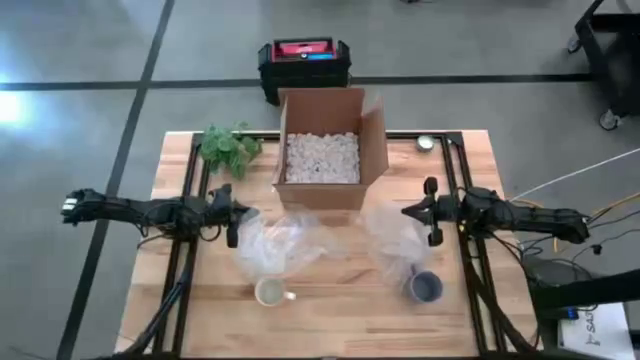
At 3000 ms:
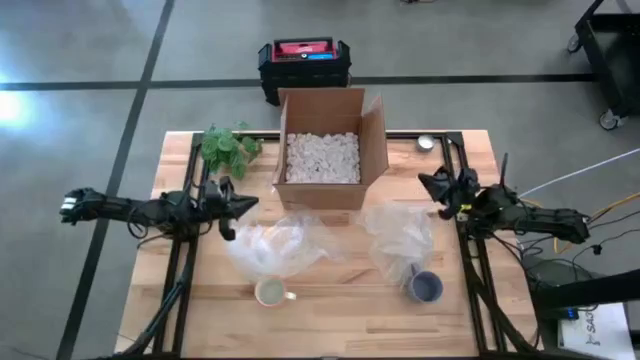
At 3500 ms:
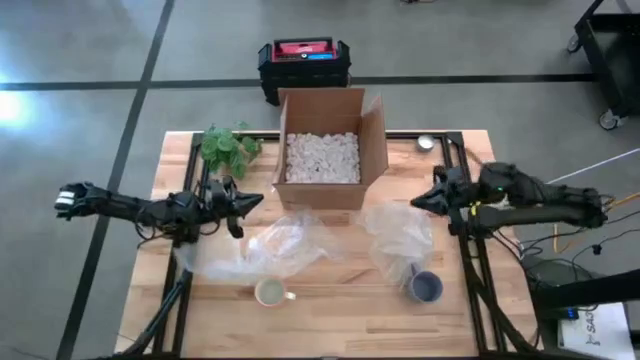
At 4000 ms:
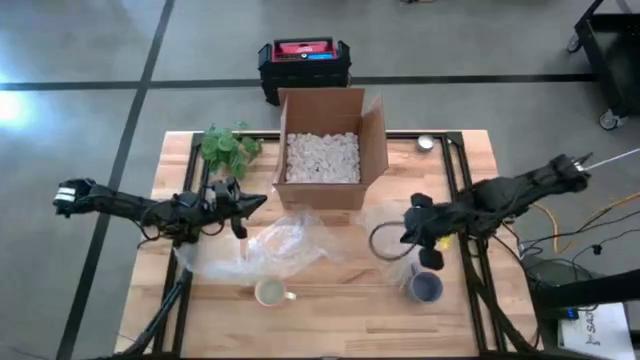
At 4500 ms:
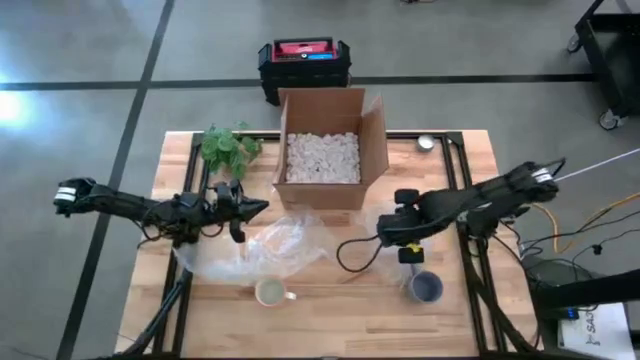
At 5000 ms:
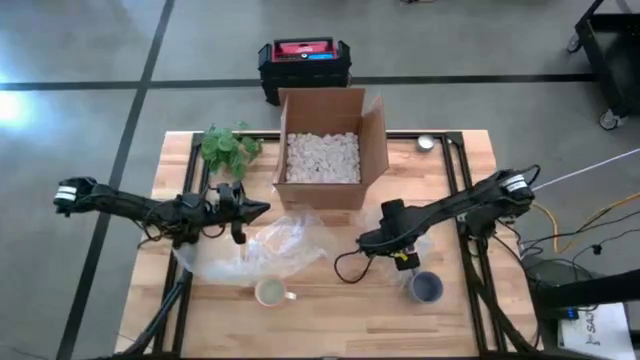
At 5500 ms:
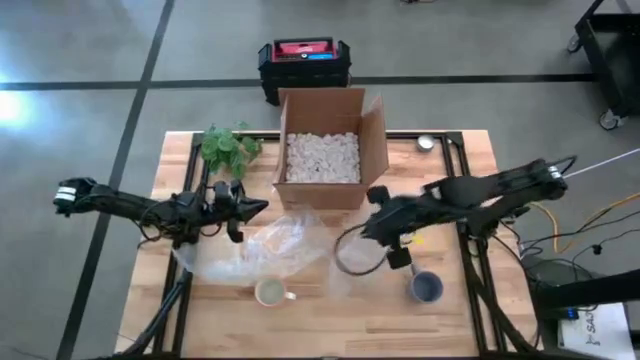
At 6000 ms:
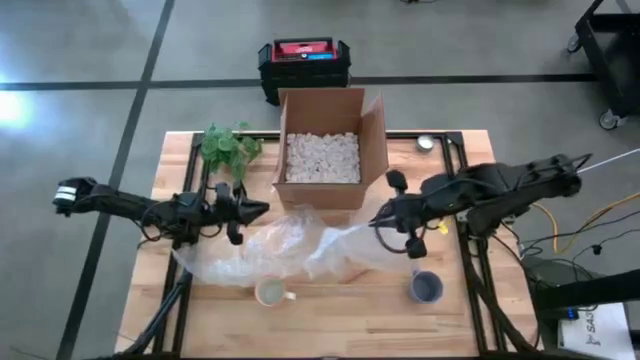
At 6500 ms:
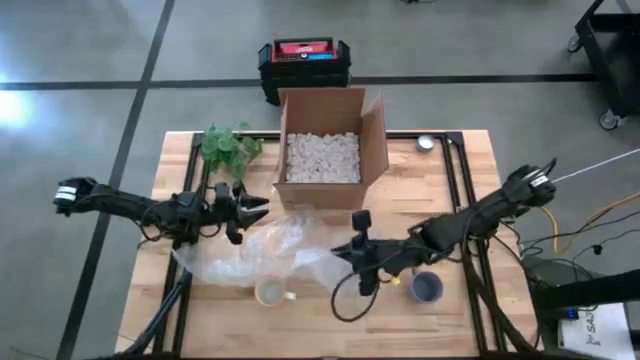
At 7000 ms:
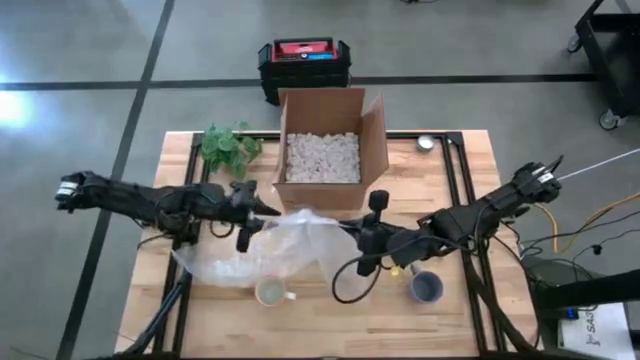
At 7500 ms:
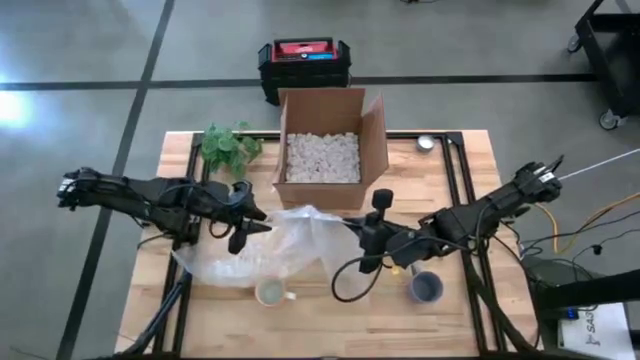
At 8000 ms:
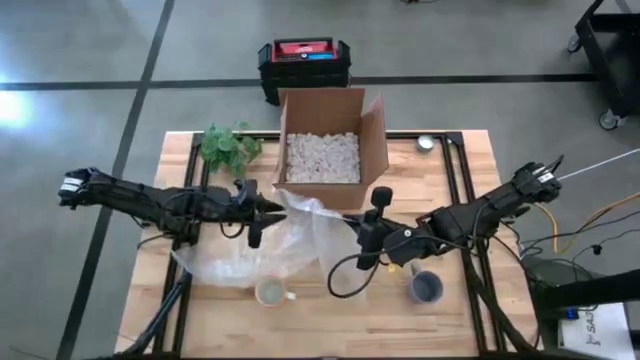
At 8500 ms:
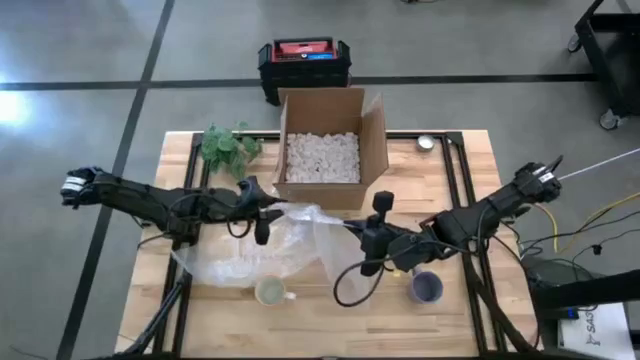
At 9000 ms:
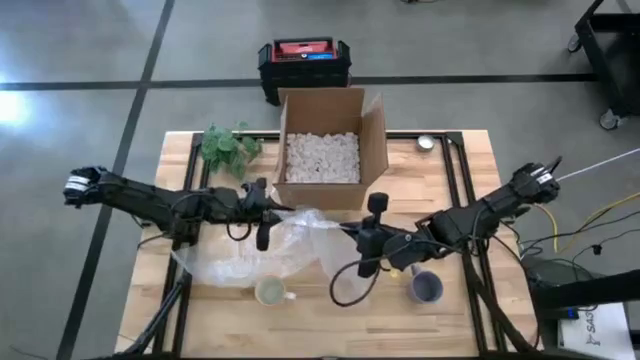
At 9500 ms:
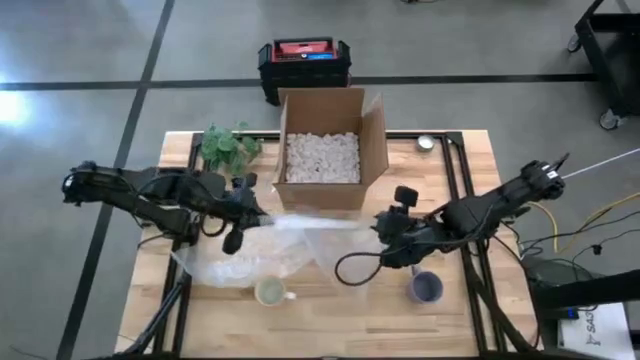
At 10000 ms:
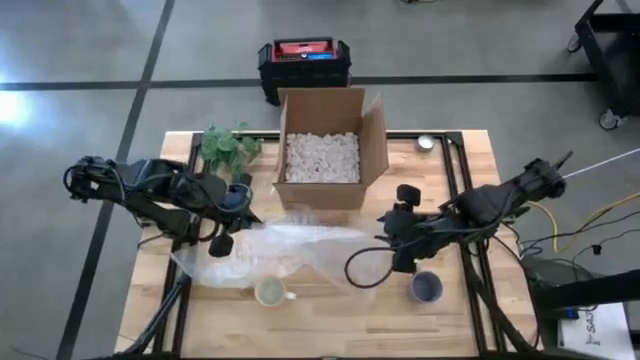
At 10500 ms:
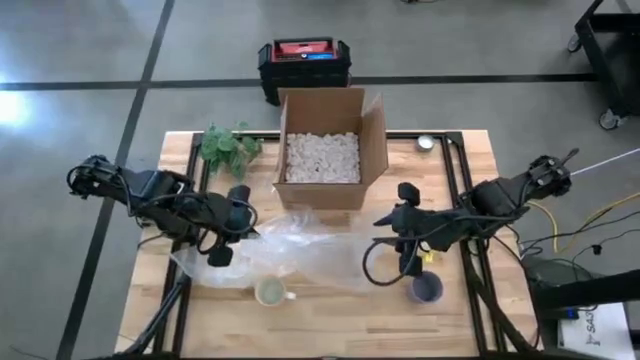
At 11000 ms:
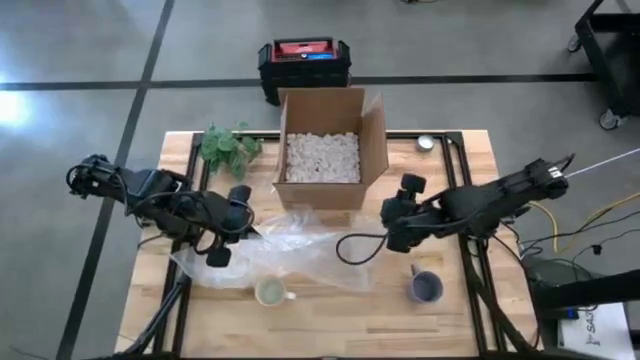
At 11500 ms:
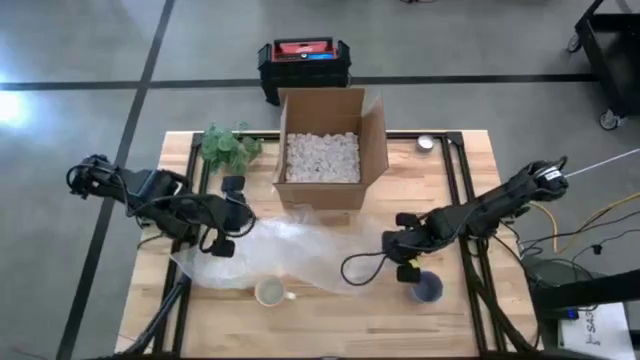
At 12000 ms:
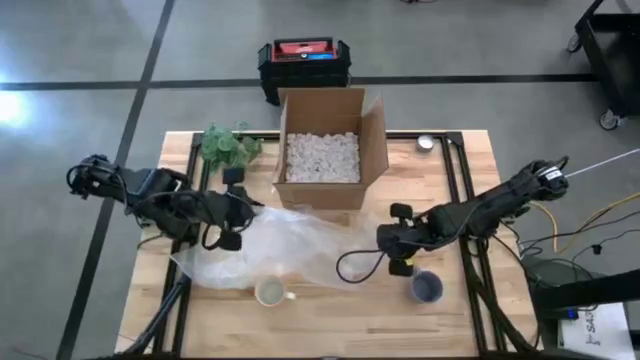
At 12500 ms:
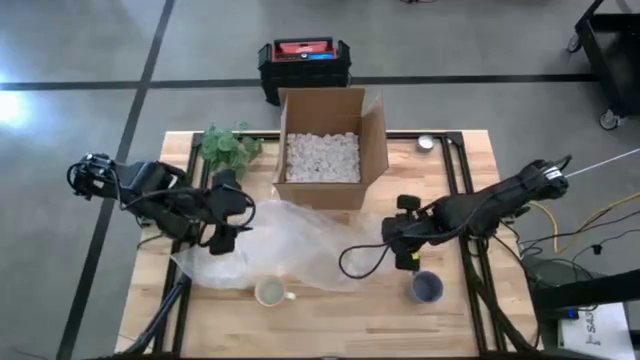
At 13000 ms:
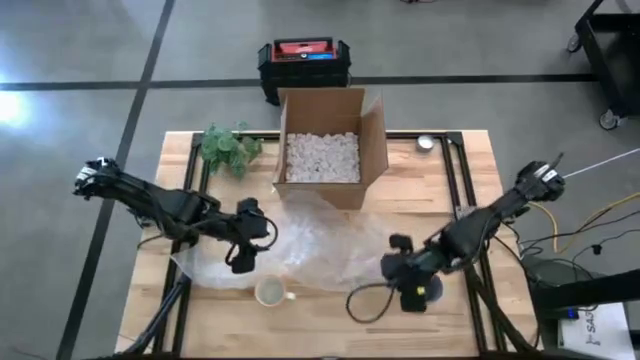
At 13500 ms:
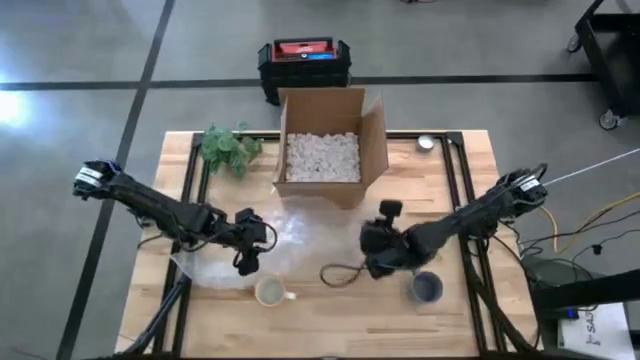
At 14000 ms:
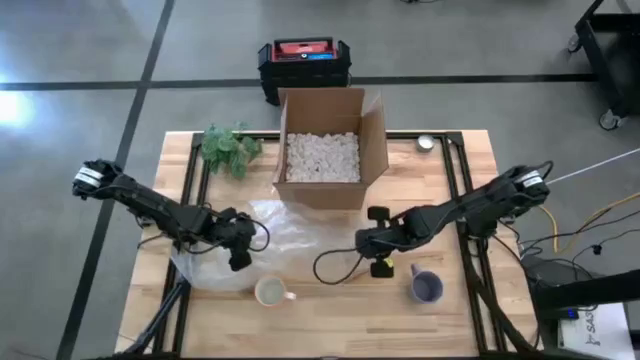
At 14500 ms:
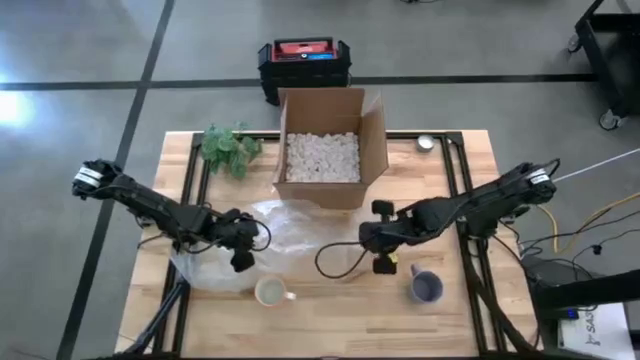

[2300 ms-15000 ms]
Task: wrap mug
Wrap the blue mug with the right bubble wrap
